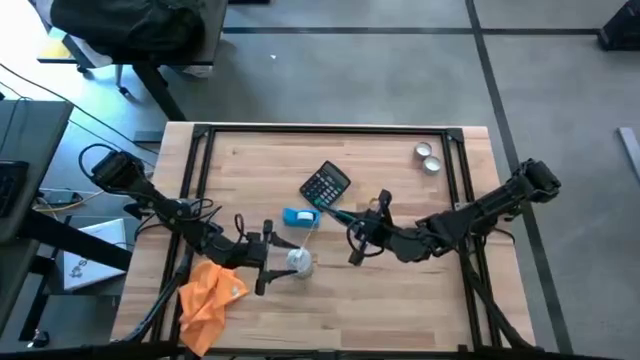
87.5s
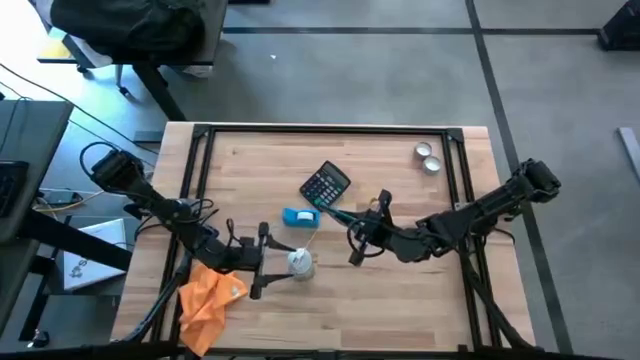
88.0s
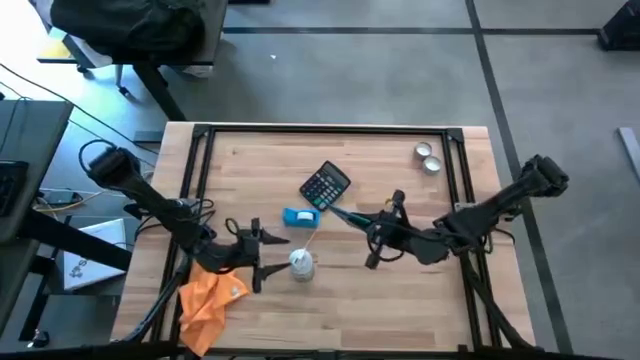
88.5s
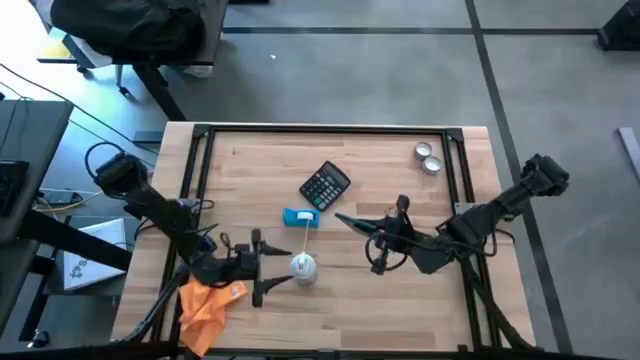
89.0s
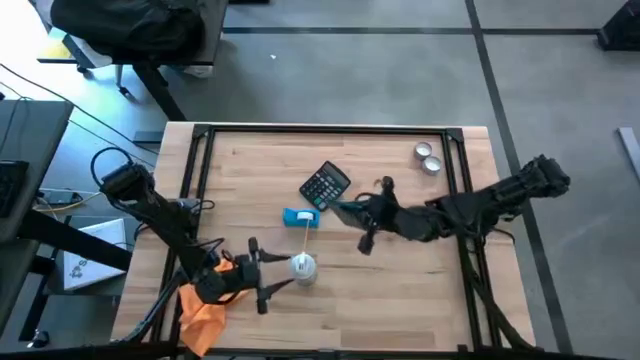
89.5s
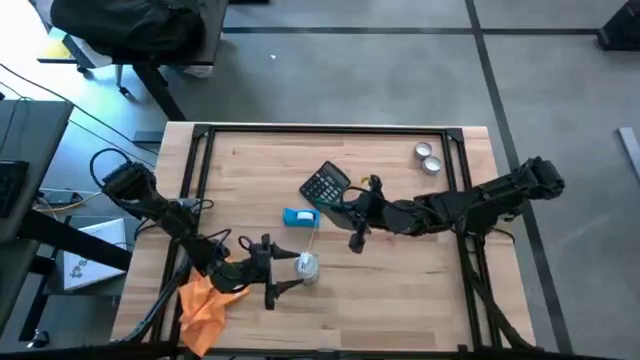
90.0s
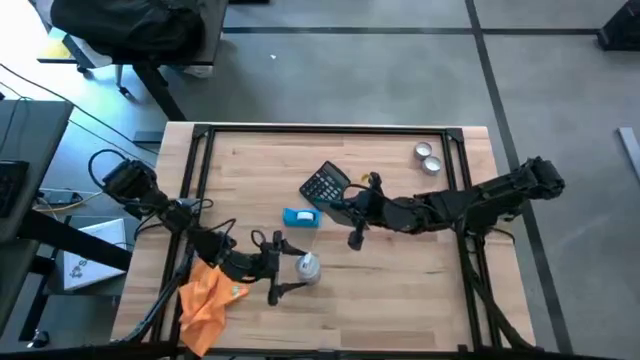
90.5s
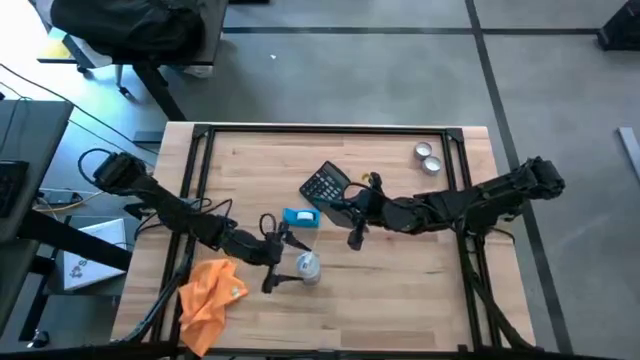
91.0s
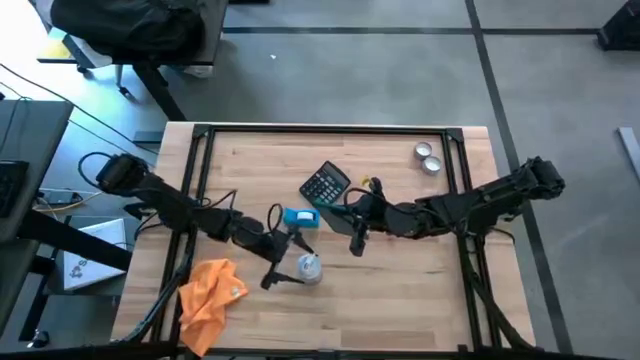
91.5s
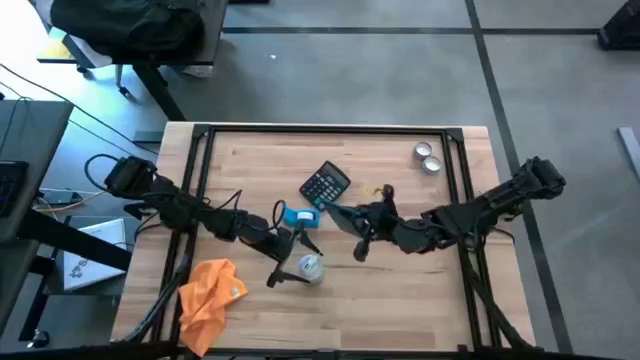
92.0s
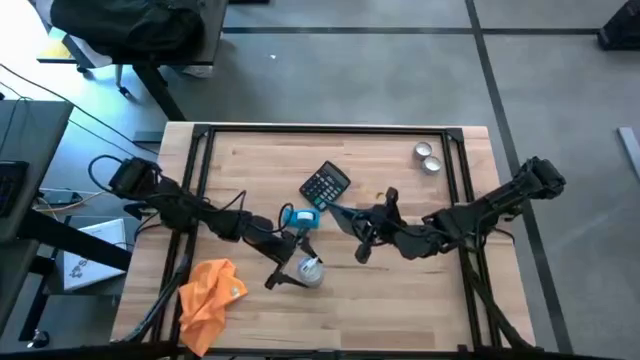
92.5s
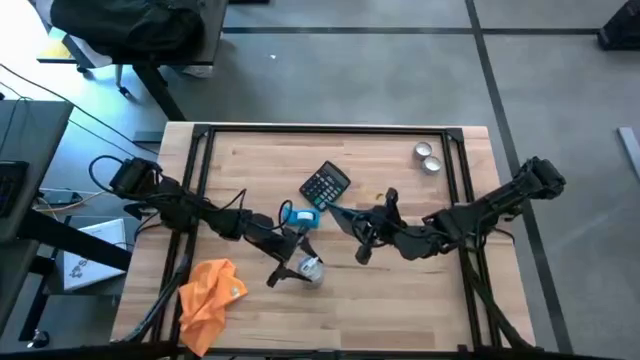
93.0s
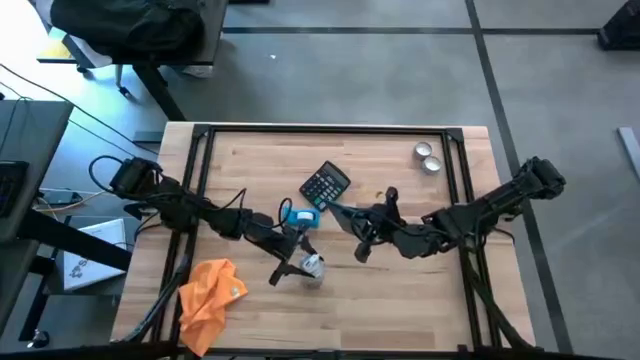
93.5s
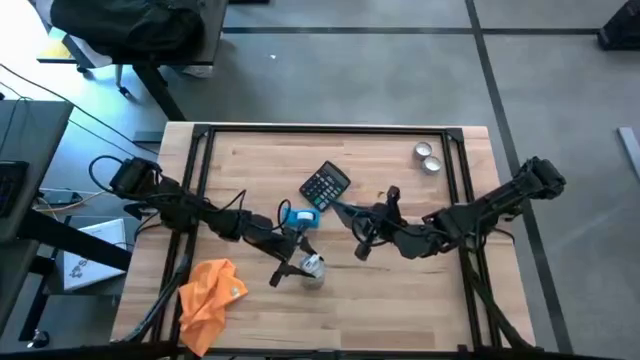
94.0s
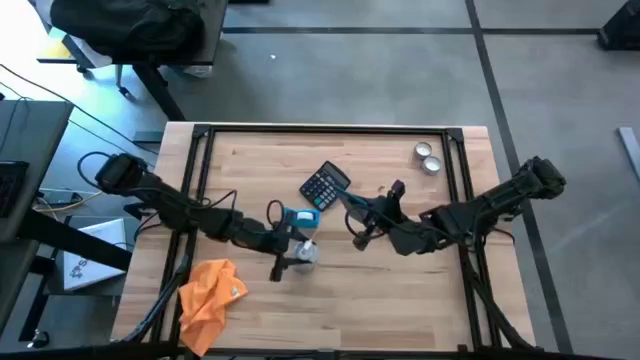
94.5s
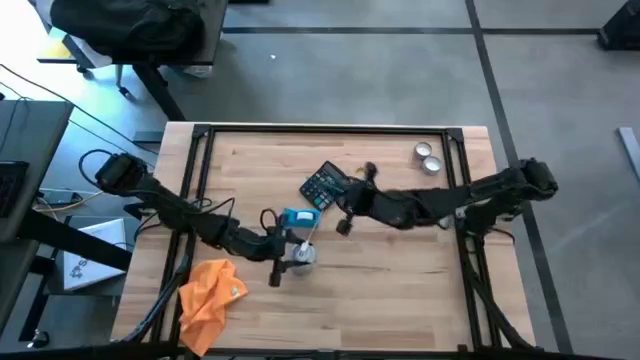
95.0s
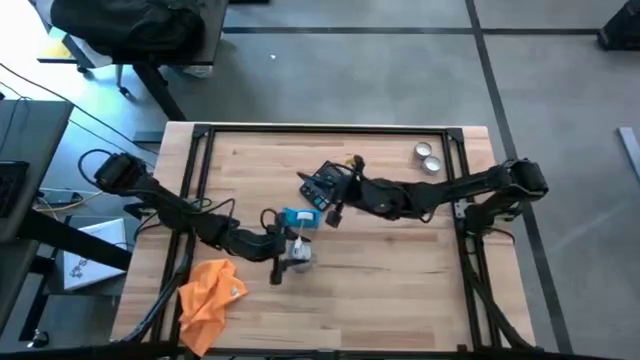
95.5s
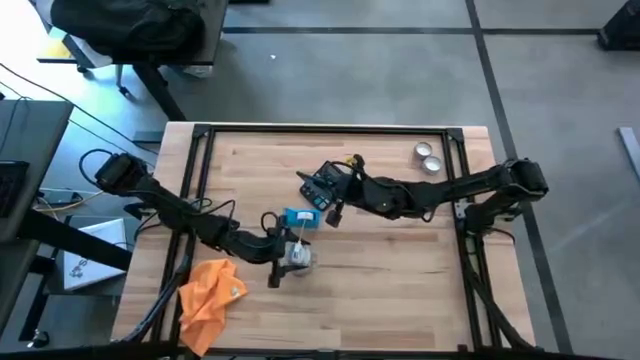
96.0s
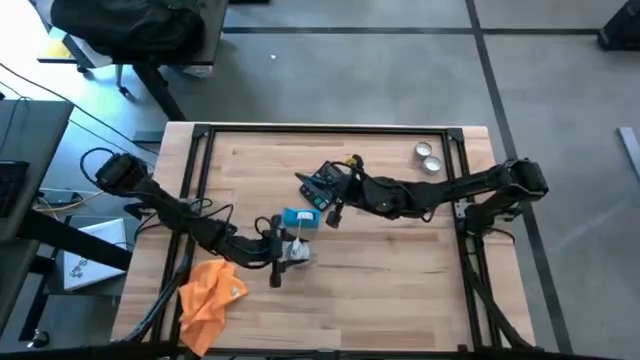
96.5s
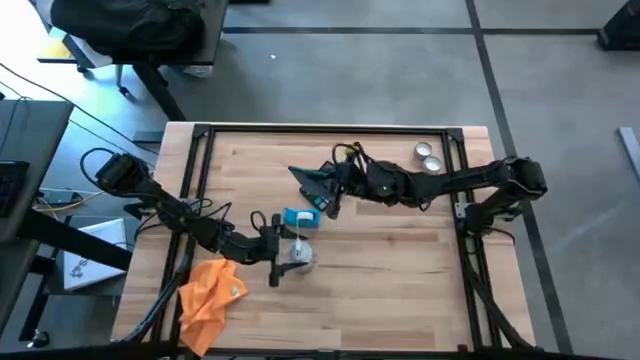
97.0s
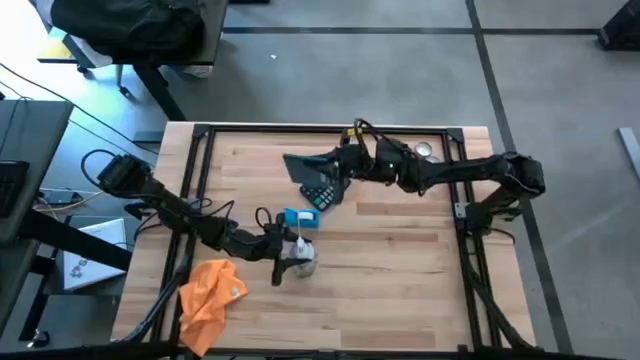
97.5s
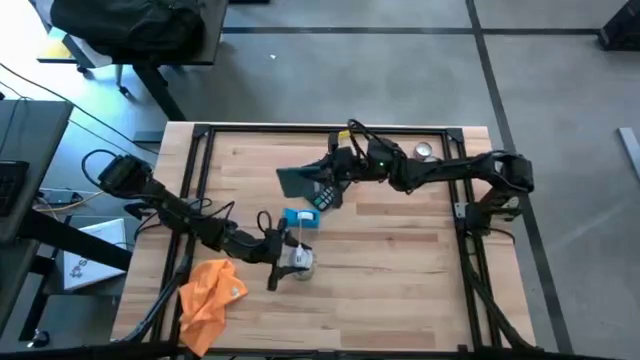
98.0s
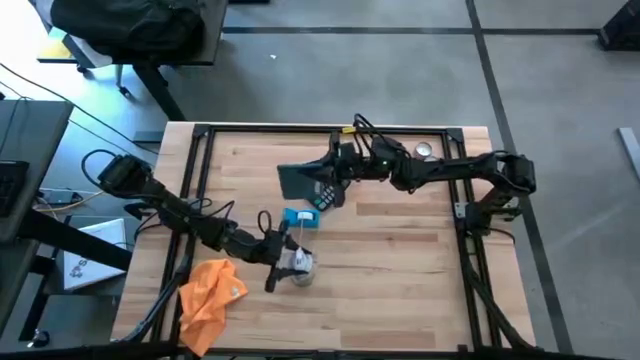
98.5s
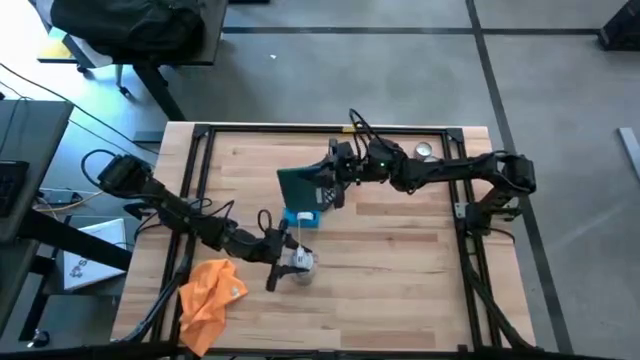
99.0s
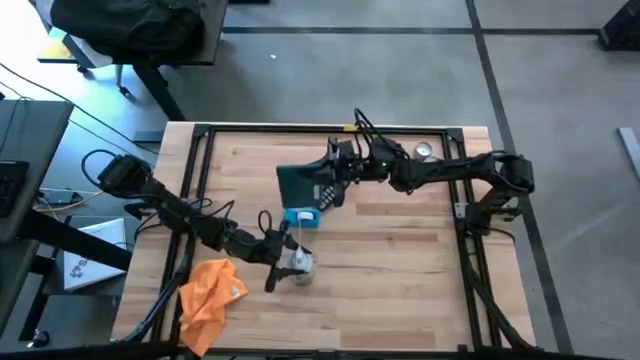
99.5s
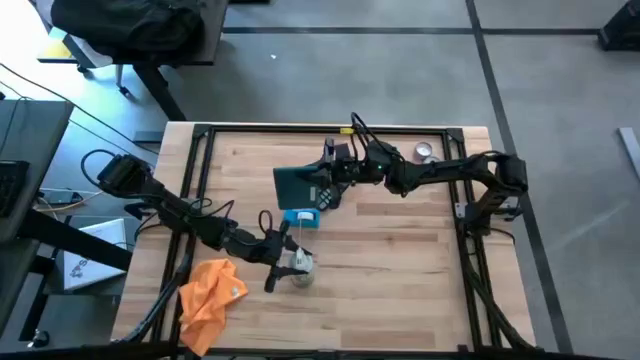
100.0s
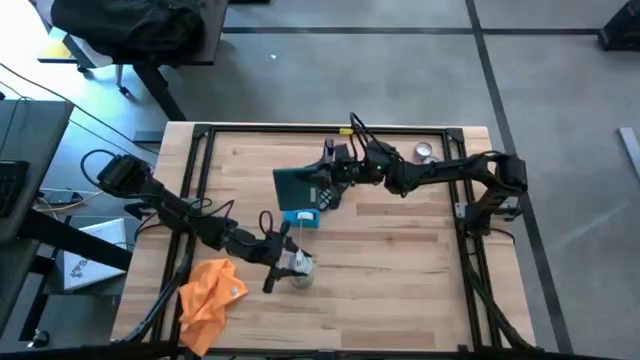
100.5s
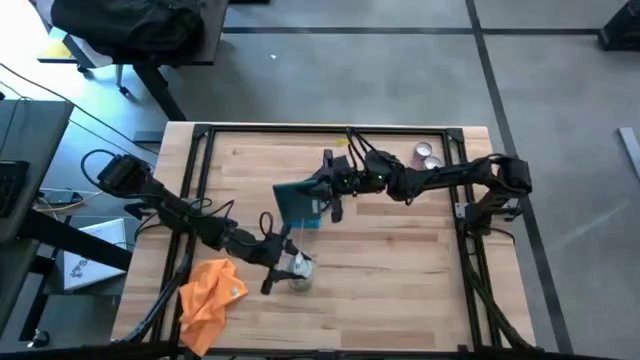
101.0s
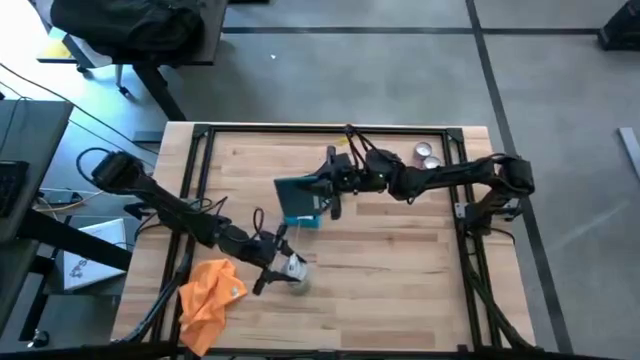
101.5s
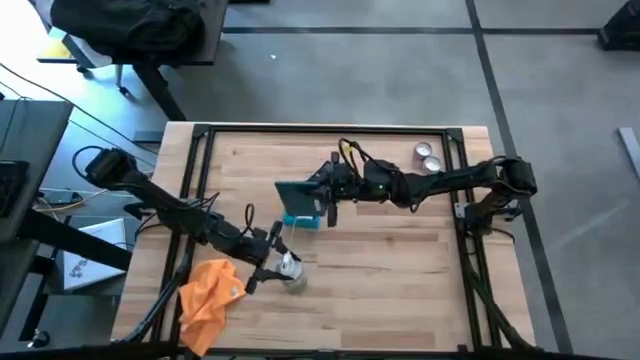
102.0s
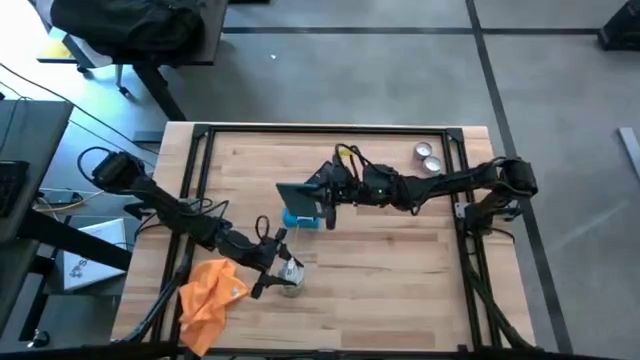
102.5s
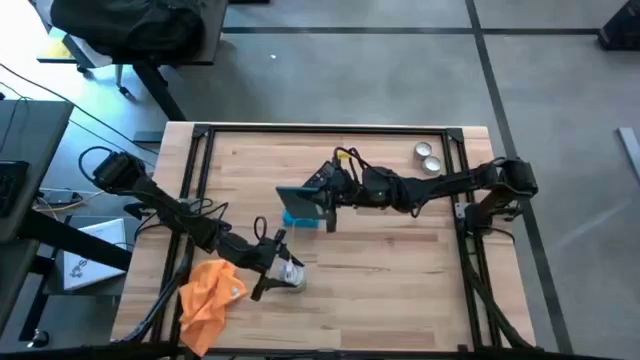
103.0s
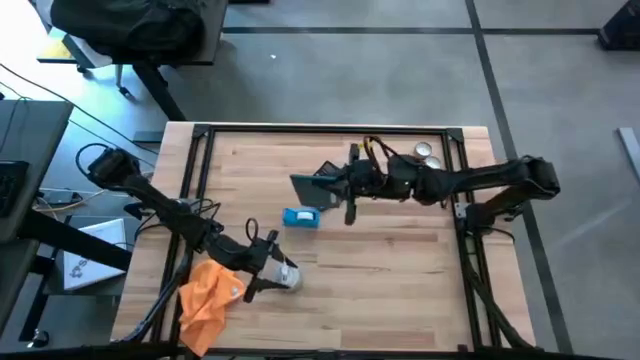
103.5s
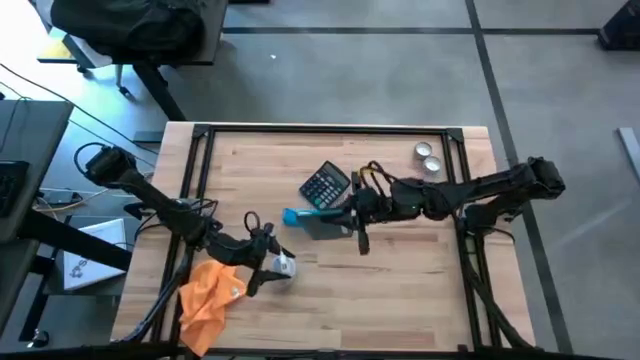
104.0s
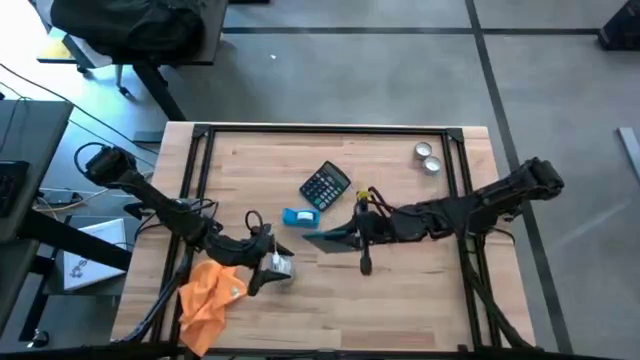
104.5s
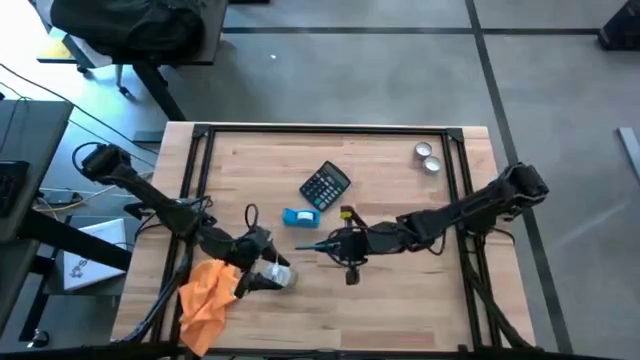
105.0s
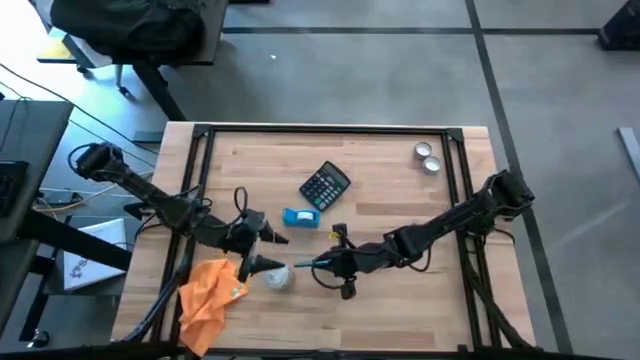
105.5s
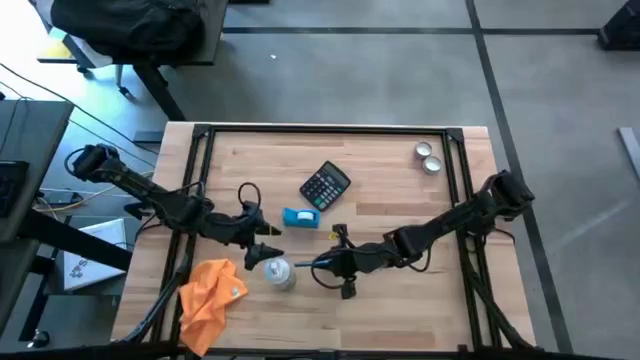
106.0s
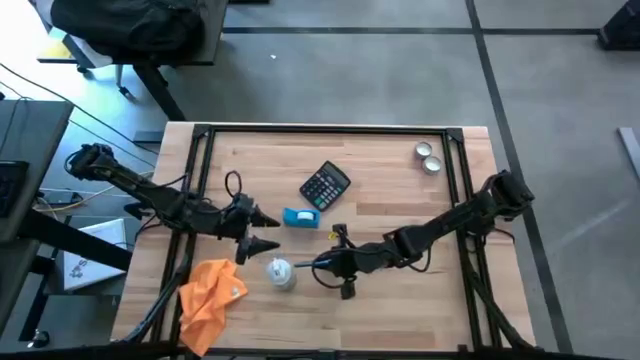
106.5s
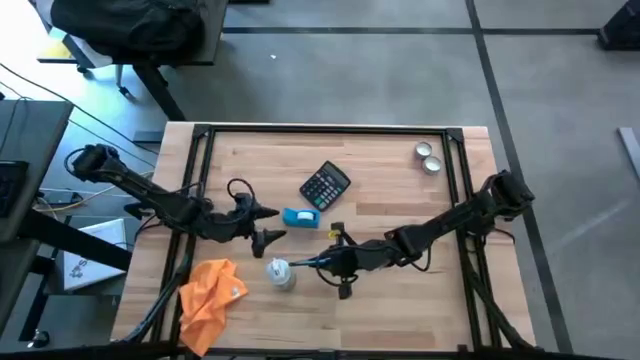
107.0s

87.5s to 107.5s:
Task: Apply microfiber cloth
Spray the cellphone using the white spray bottle

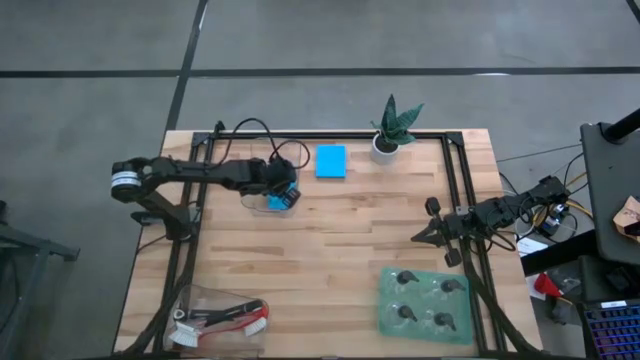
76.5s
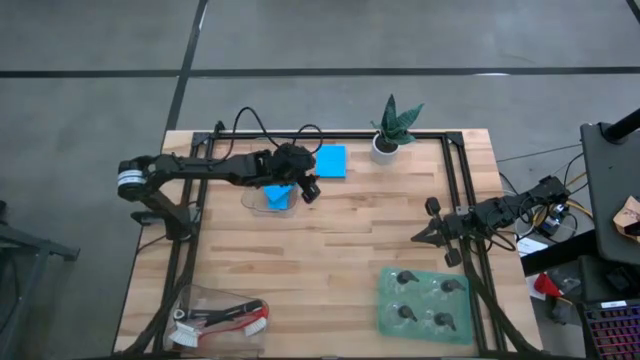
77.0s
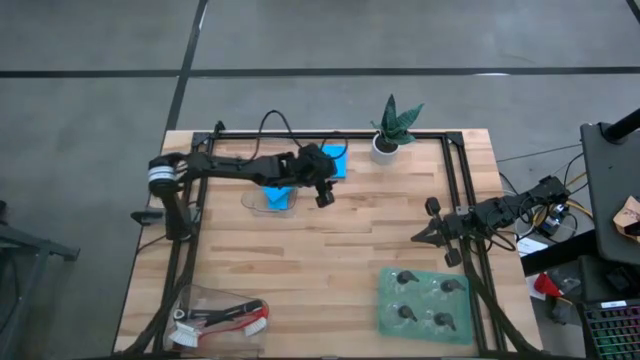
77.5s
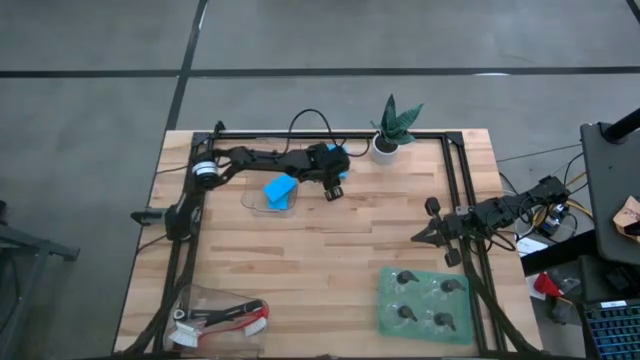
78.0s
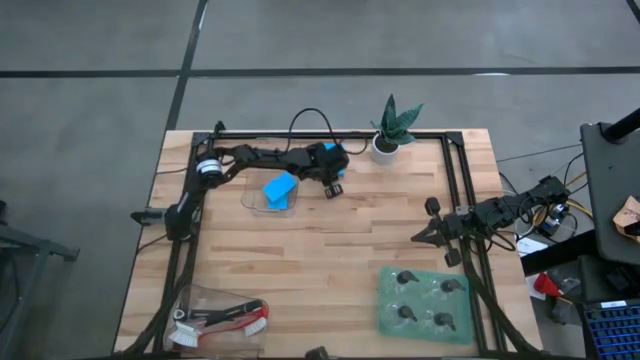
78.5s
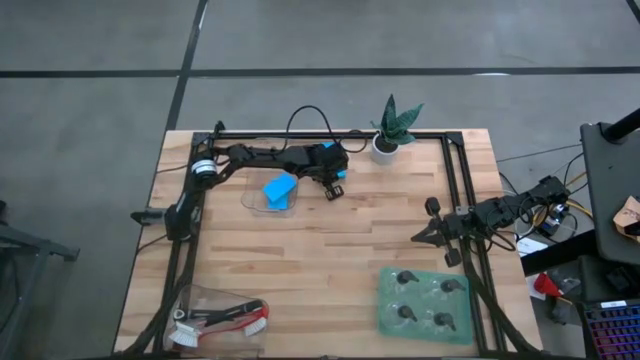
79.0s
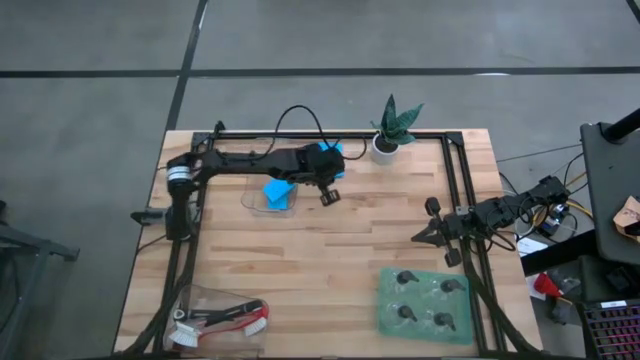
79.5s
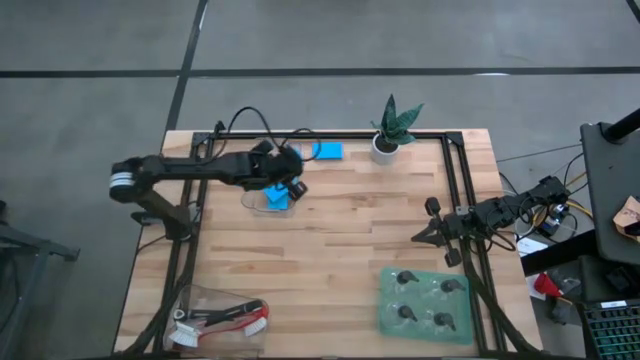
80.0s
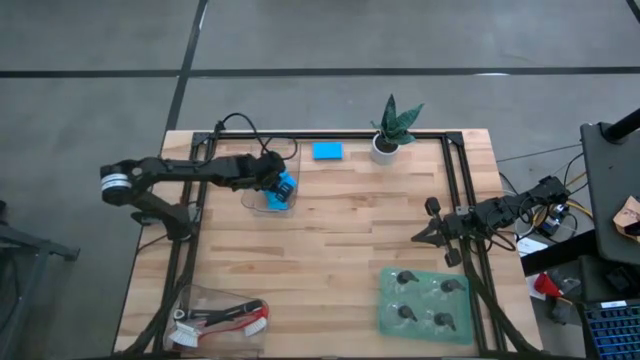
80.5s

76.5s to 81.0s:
Task: Pick & Place Kitchen Sink Supplies
Put the sponge into the top transparent bin
